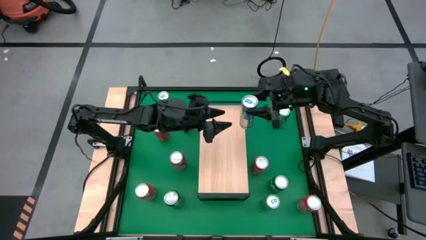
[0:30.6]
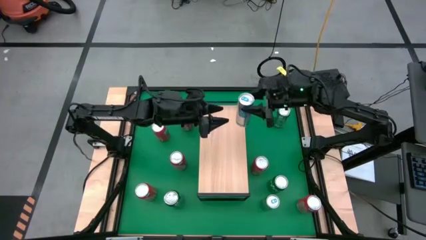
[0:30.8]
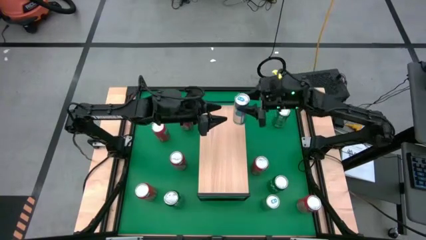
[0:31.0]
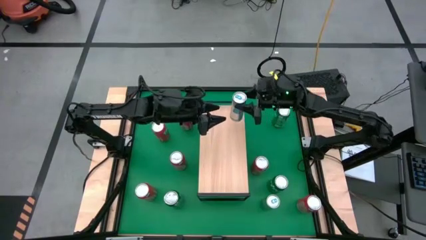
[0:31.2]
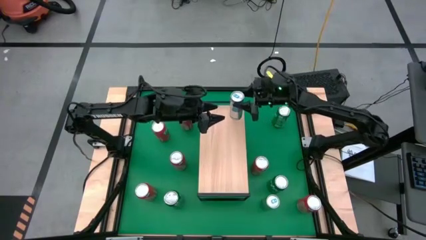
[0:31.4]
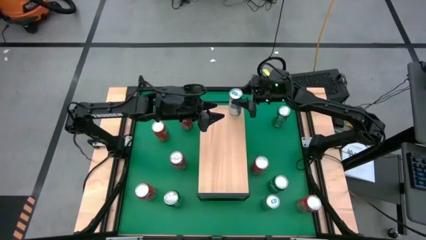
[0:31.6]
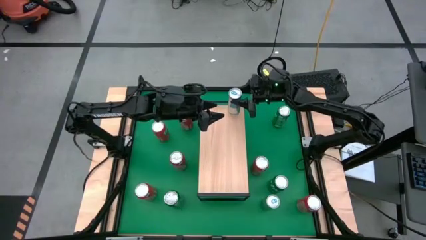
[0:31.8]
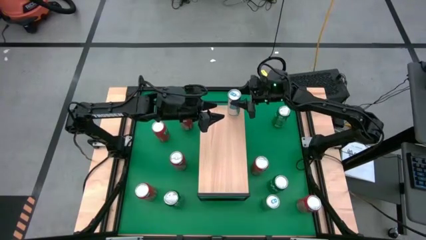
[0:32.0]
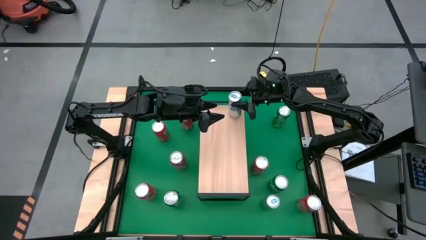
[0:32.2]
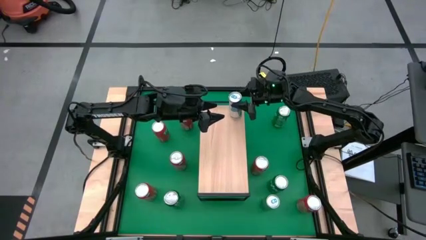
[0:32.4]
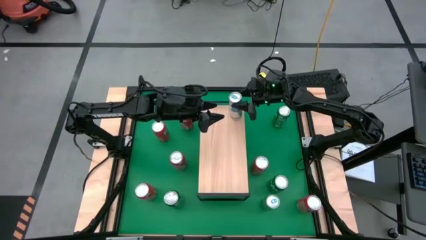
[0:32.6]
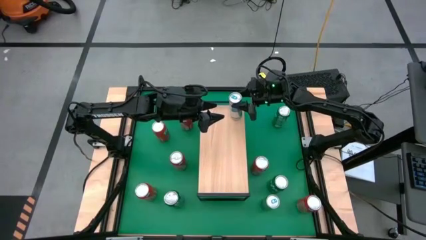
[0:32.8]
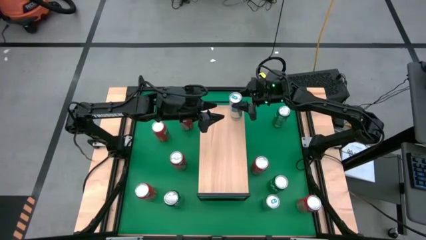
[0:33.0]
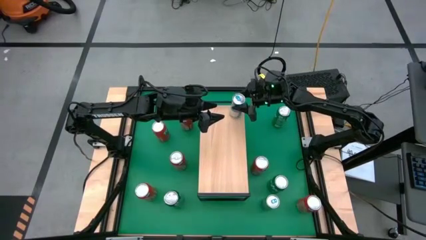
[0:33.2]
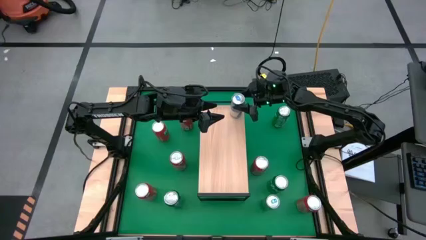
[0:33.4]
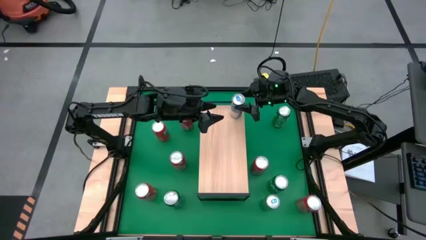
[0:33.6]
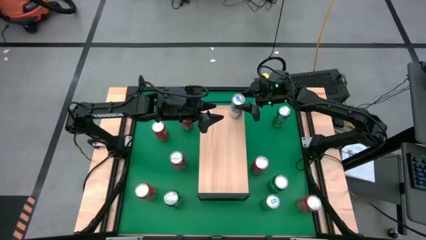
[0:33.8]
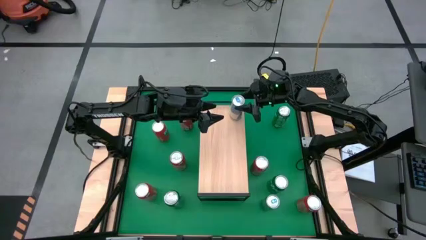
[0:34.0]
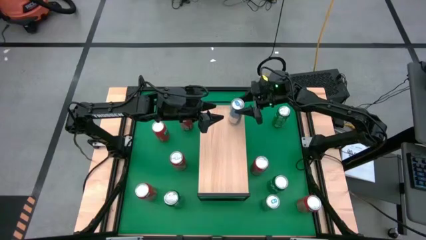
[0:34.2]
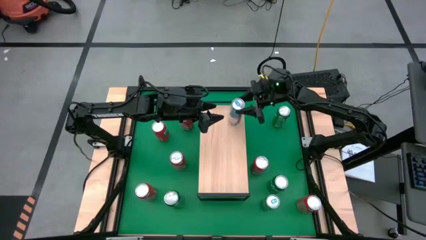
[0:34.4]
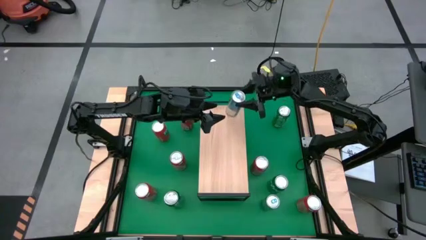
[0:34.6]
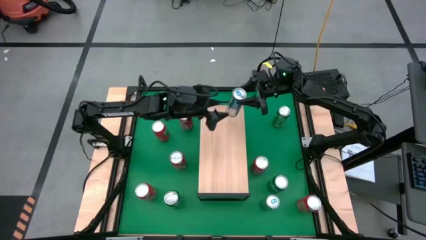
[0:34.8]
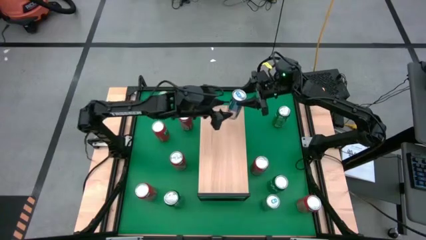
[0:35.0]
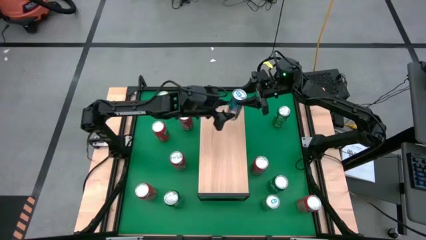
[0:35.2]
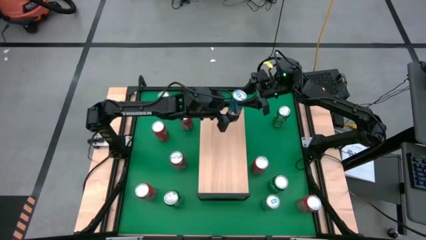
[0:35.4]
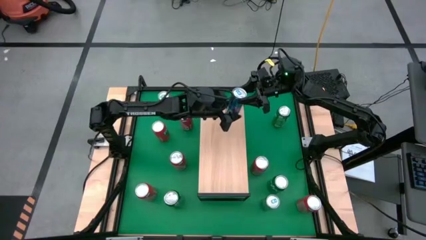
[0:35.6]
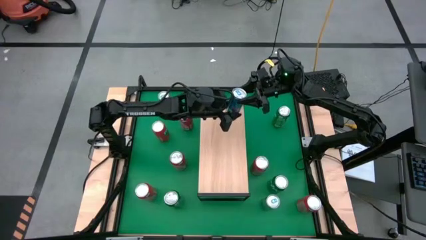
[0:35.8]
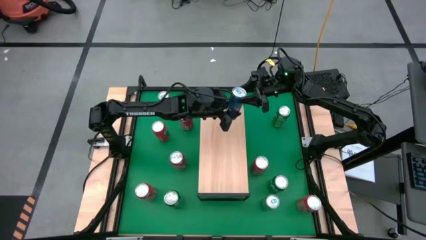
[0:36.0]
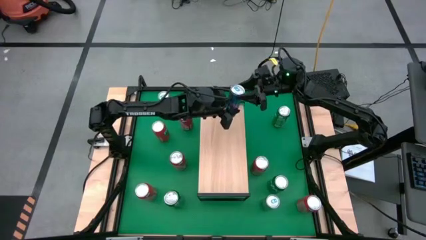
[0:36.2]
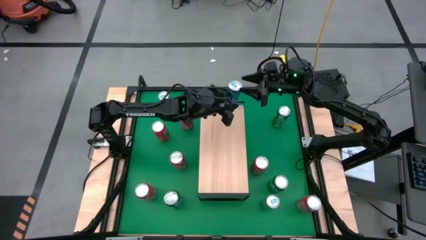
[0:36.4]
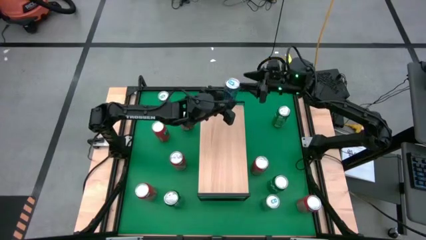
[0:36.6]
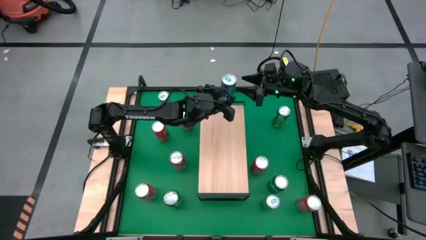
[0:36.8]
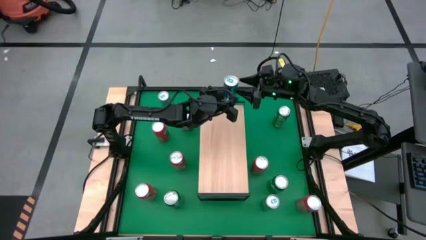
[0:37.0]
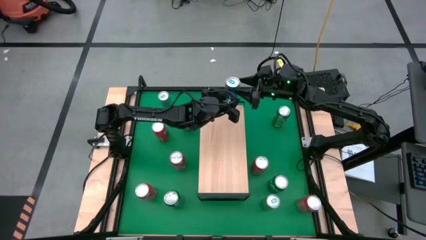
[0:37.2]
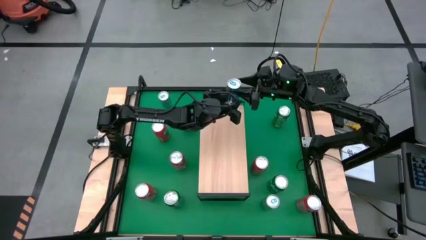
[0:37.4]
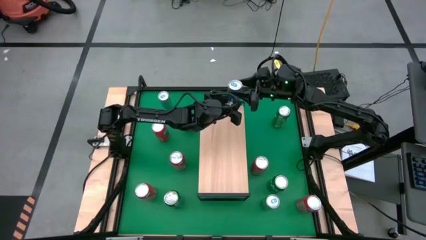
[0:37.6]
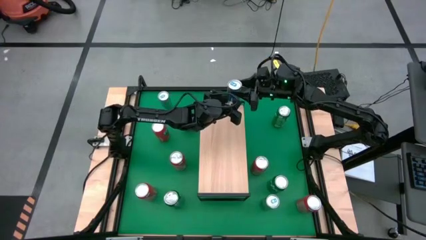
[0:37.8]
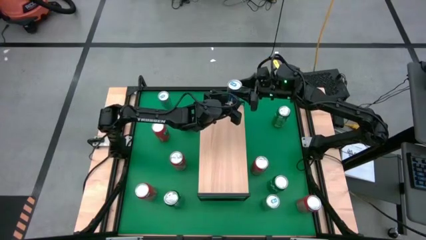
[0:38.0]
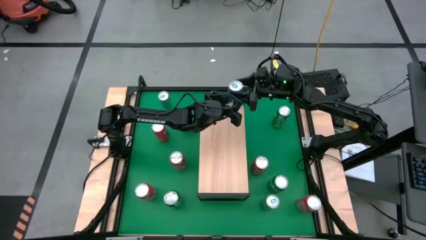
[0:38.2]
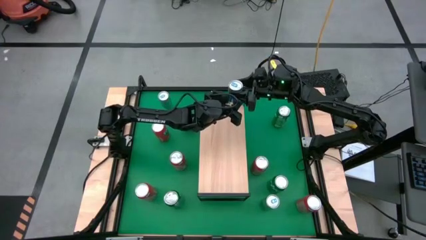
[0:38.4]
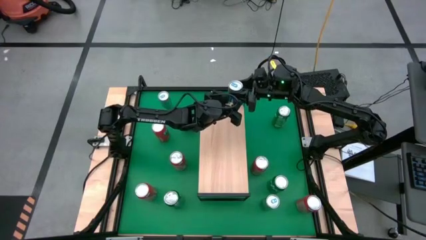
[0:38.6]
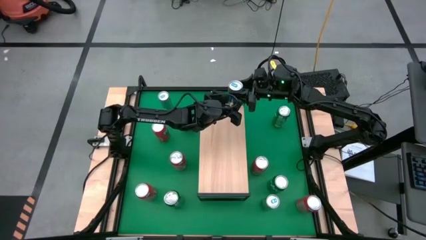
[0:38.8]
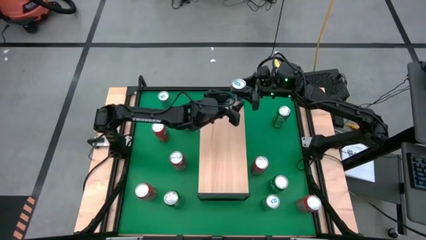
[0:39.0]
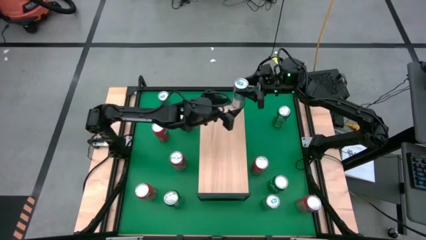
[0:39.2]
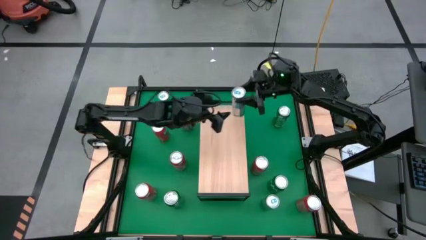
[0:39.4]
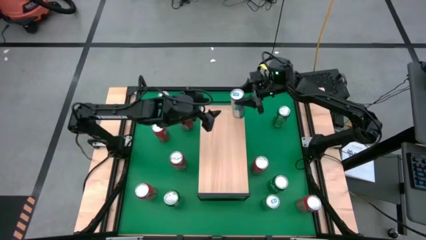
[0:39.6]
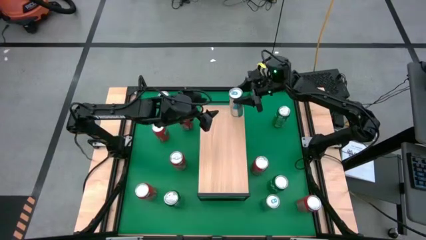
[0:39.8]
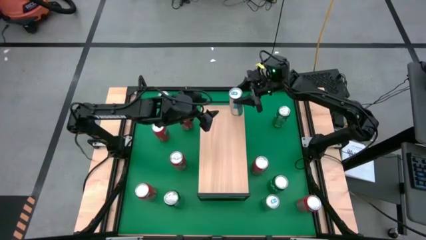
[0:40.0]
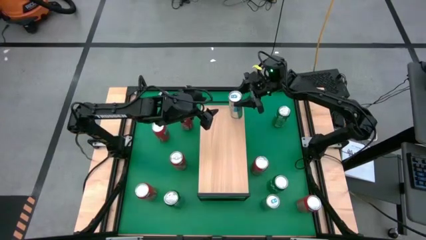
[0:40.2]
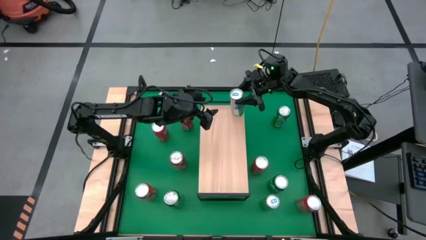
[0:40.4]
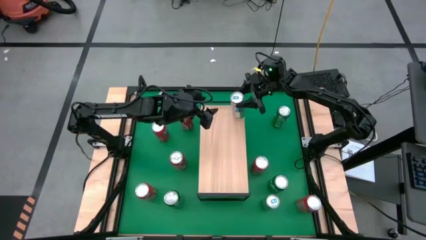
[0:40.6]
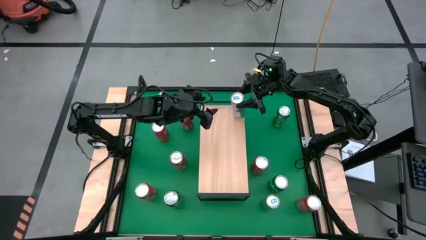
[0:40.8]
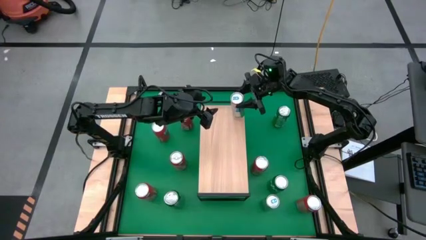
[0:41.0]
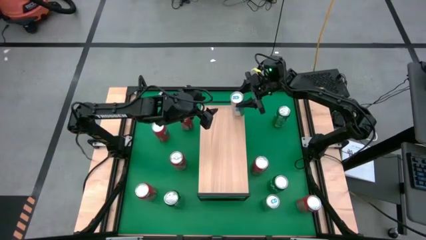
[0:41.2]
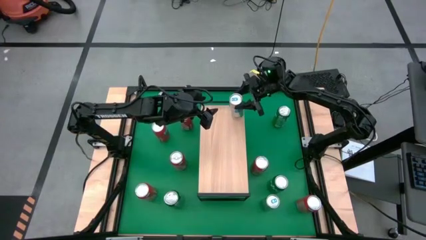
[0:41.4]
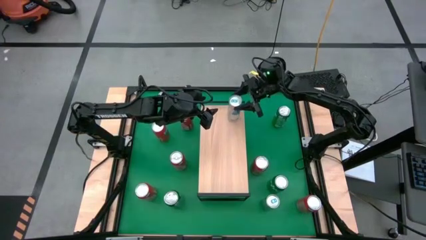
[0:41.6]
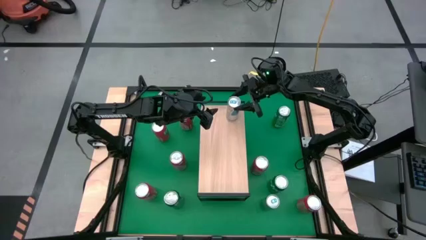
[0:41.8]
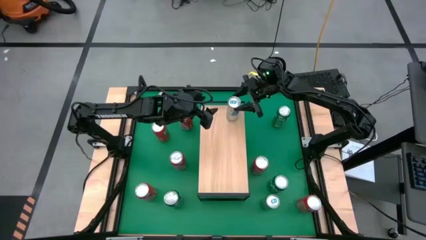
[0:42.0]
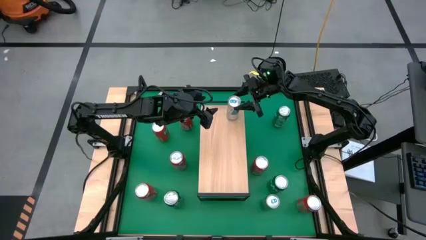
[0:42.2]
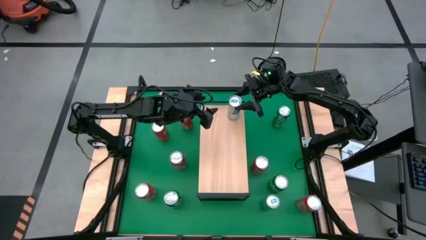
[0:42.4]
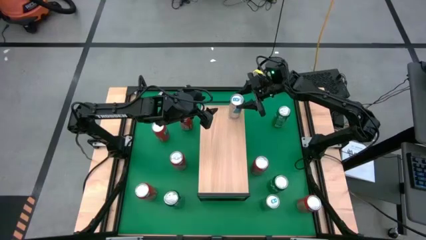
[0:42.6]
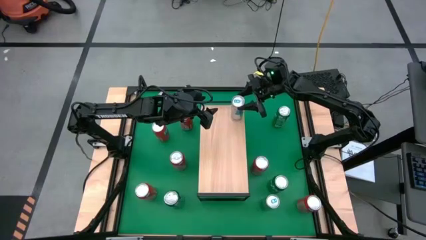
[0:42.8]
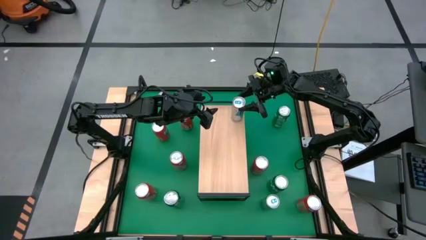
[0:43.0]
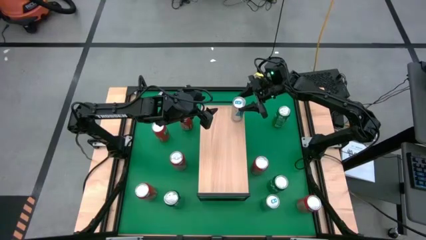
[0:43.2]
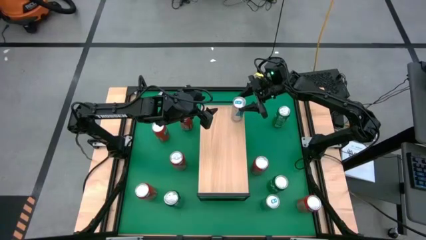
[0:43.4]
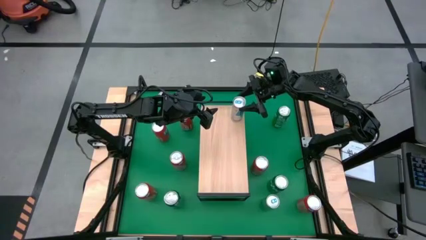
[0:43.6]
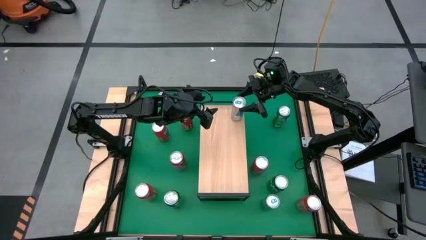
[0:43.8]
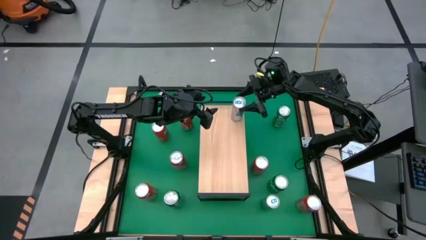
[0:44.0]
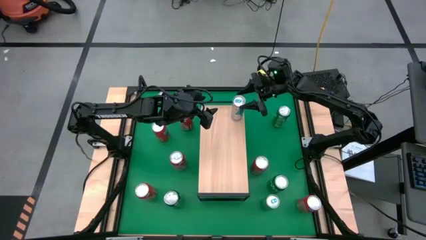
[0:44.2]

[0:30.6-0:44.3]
Task: Place canned beverage on shelf
Put the blue soda can on the shelf

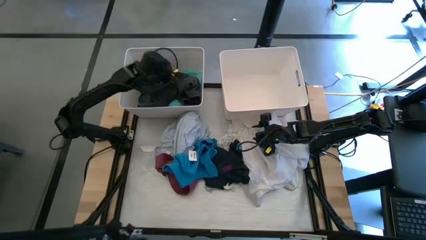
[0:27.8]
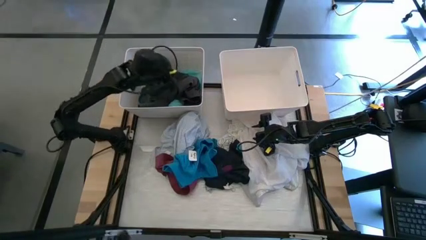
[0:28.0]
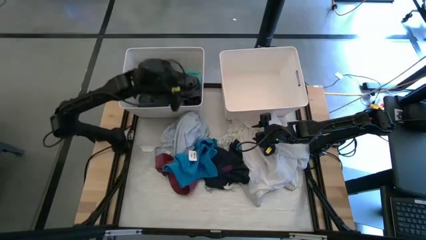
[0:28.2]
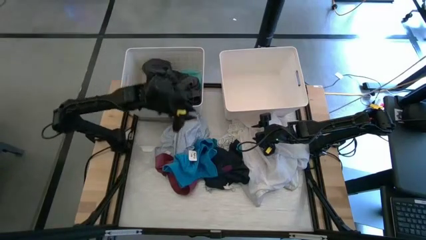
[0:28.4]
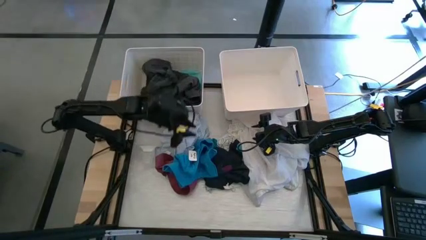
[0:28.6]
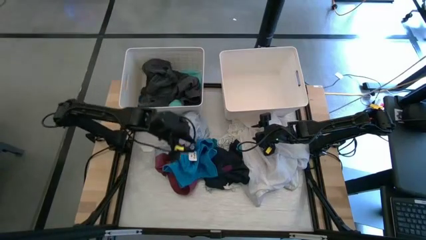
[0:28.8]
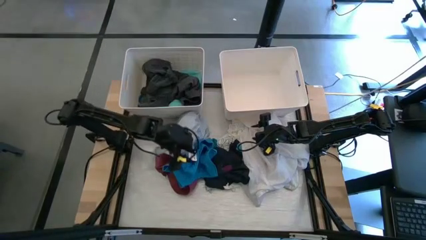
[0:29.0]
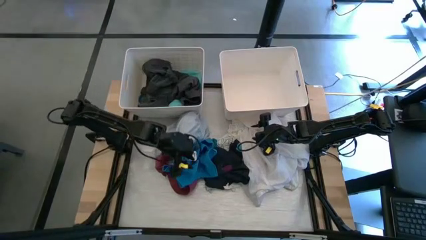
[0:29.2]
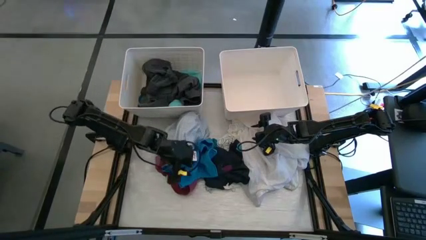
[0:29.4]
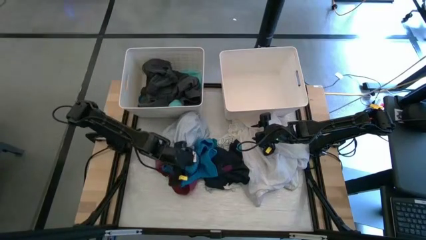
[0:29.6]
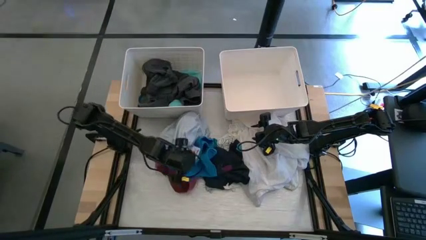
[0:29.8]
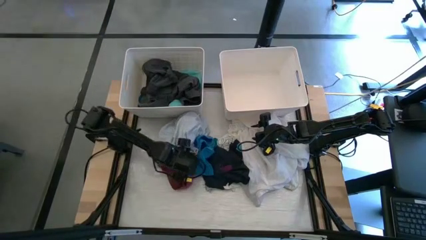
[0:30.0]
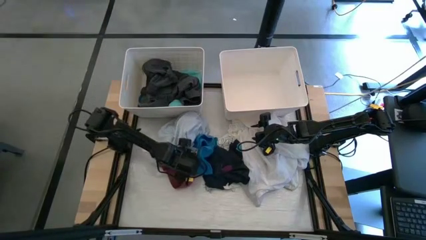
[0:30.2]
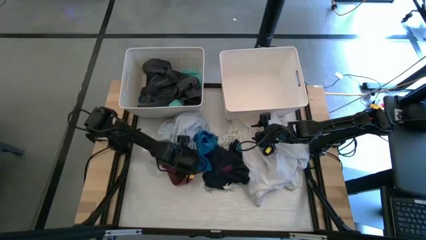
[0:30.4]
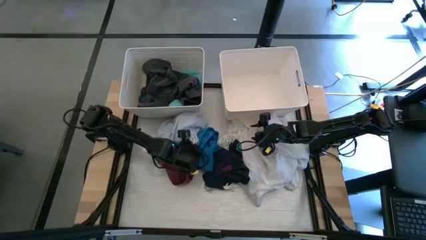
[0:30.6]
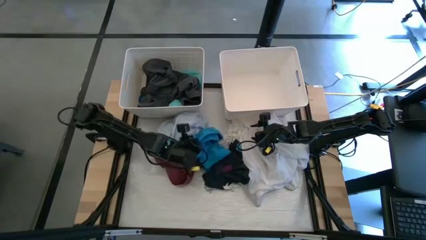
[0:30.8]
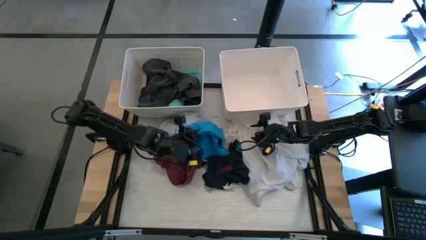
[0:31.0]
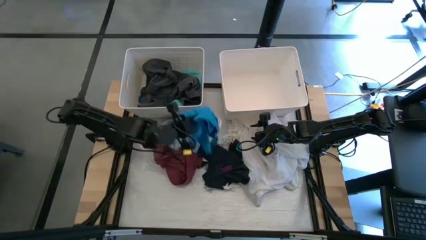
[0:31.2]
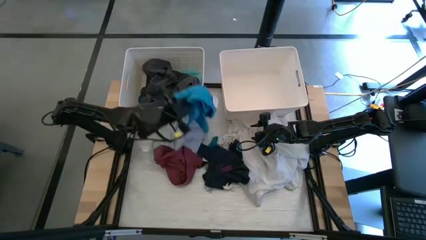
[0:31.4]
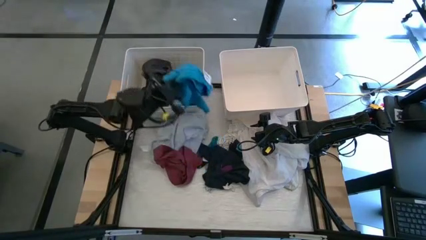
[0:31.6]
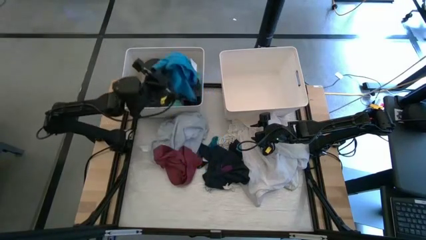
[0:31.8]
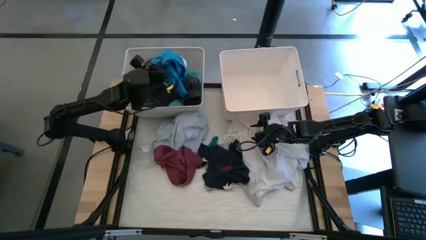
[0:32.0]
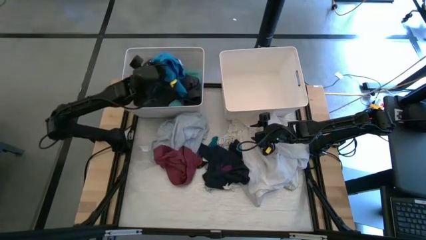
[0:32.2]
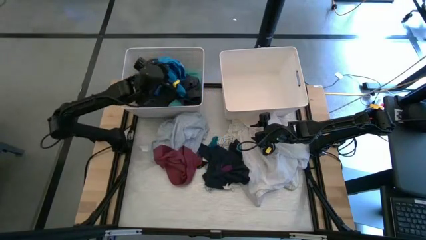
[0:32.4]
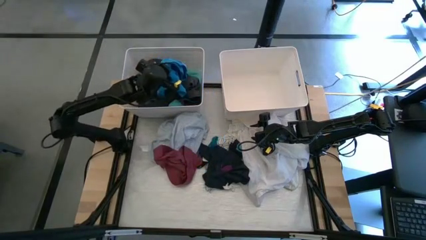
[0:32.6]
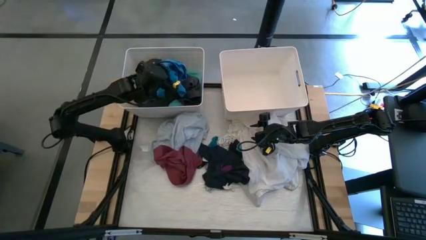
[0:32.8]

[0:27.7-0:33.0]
Task: Sort clothes
Put the light blue shorts into the left white laundry bin
